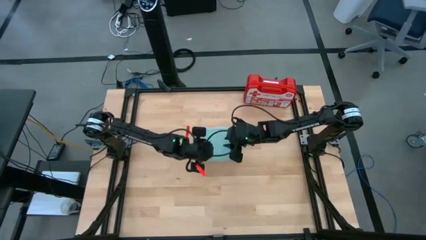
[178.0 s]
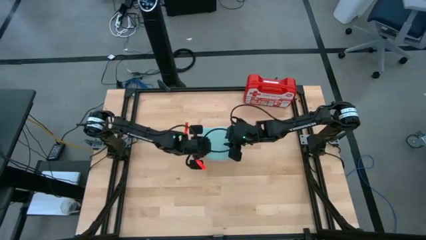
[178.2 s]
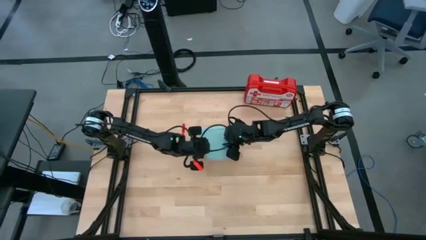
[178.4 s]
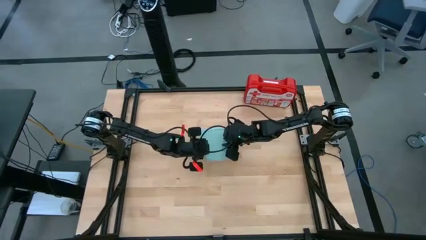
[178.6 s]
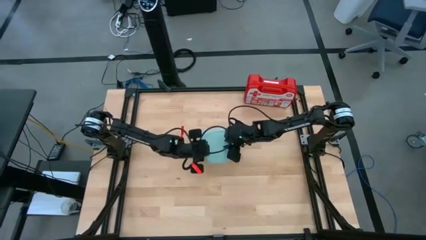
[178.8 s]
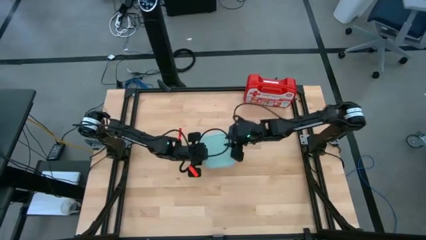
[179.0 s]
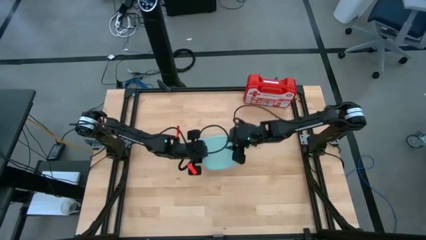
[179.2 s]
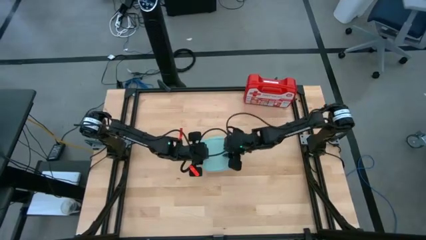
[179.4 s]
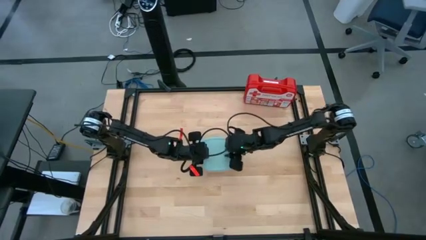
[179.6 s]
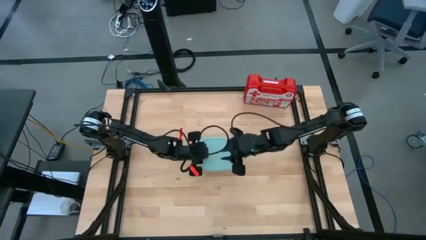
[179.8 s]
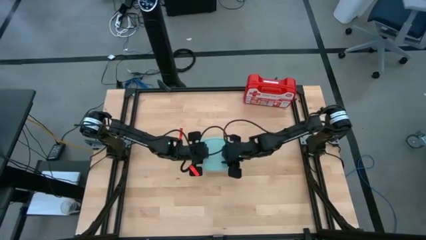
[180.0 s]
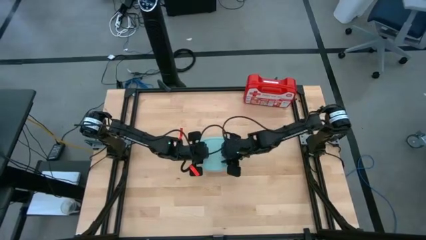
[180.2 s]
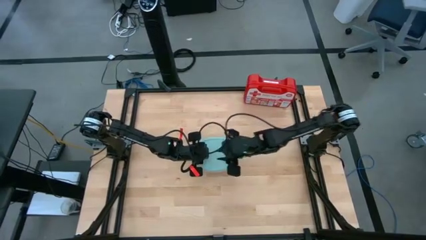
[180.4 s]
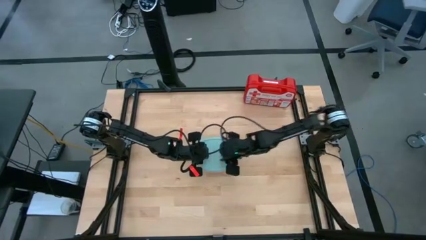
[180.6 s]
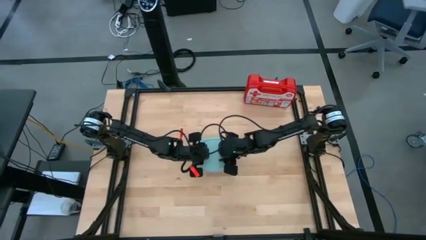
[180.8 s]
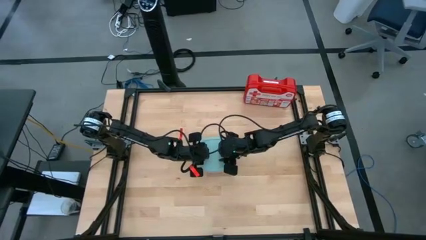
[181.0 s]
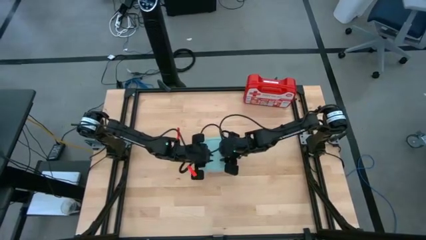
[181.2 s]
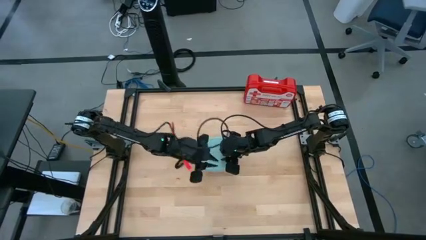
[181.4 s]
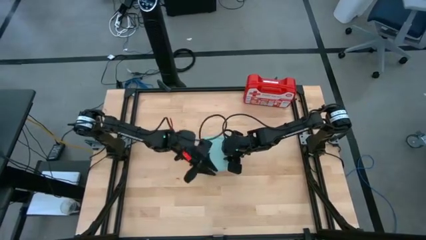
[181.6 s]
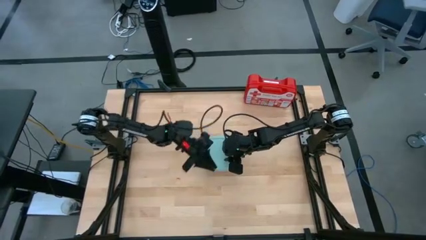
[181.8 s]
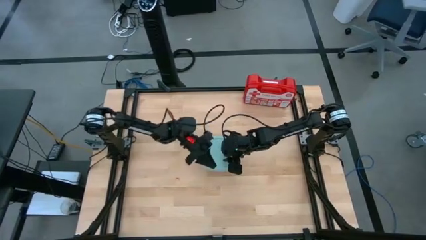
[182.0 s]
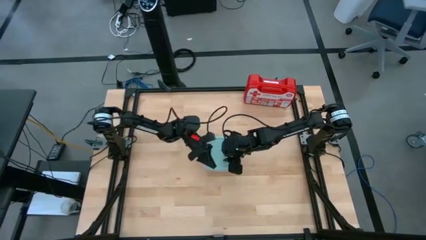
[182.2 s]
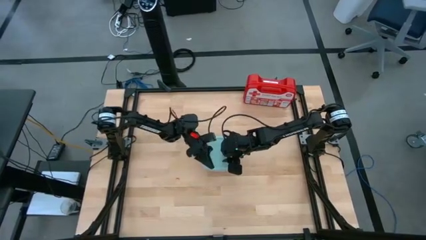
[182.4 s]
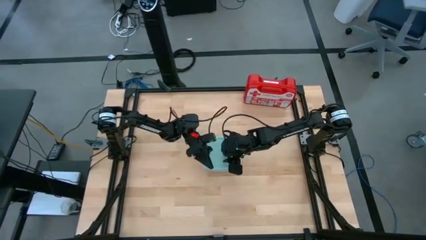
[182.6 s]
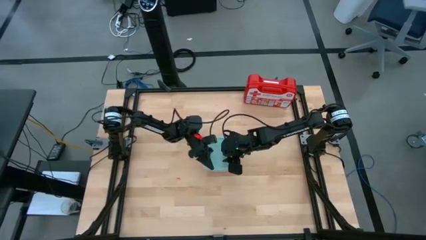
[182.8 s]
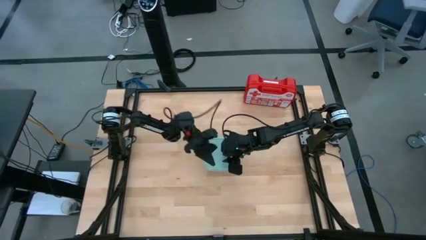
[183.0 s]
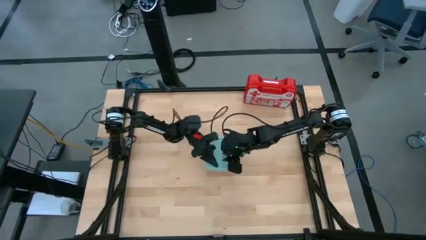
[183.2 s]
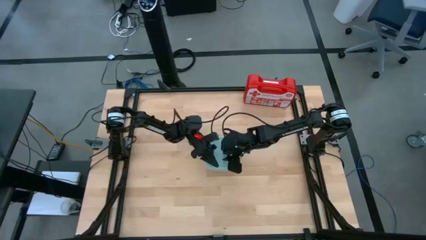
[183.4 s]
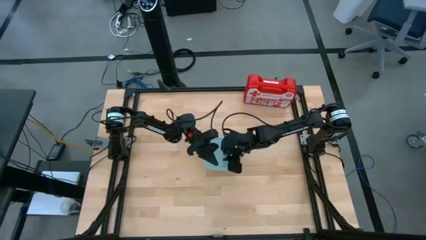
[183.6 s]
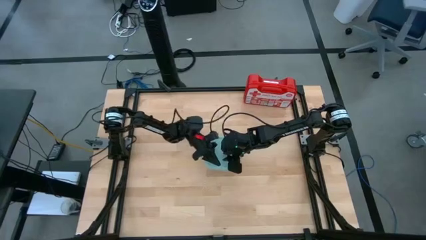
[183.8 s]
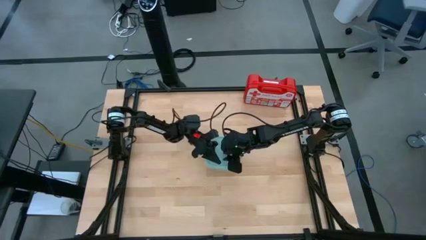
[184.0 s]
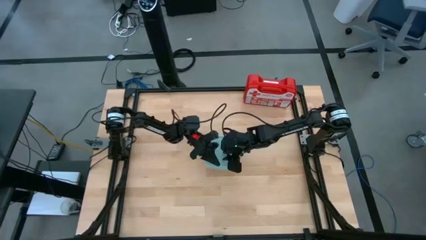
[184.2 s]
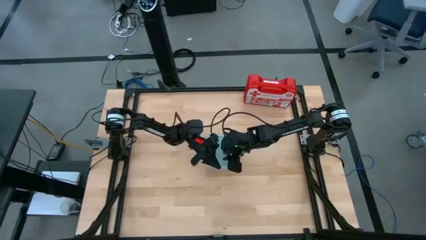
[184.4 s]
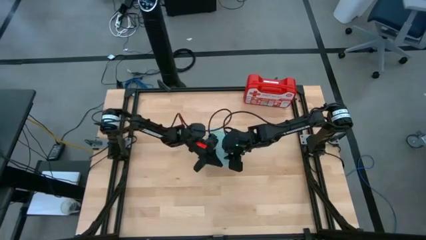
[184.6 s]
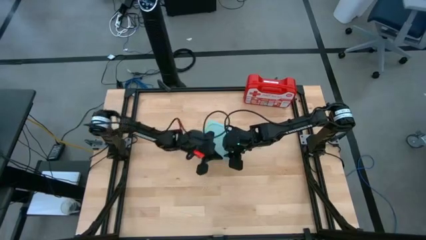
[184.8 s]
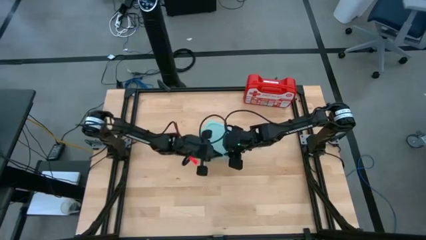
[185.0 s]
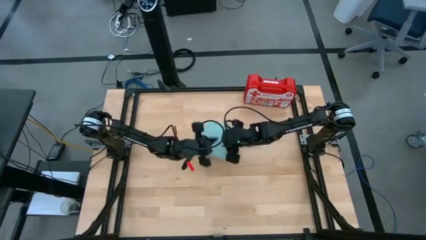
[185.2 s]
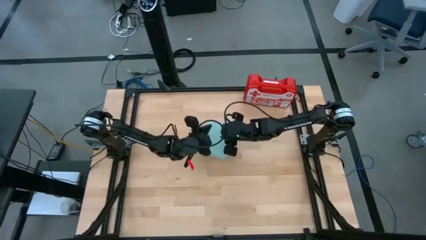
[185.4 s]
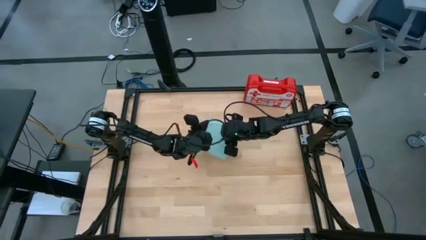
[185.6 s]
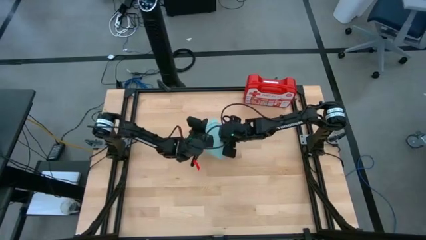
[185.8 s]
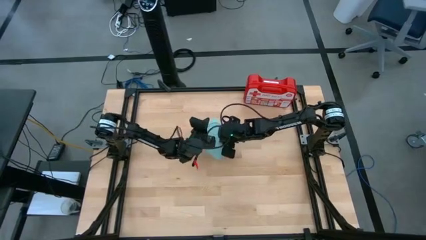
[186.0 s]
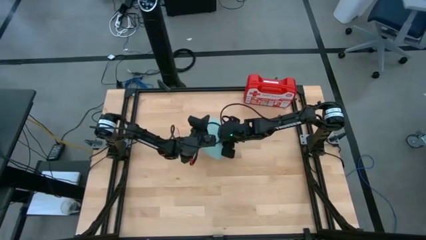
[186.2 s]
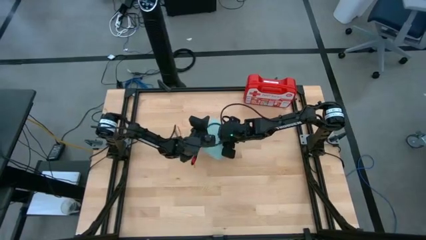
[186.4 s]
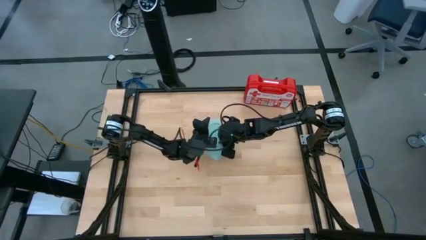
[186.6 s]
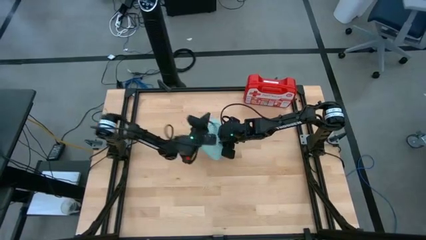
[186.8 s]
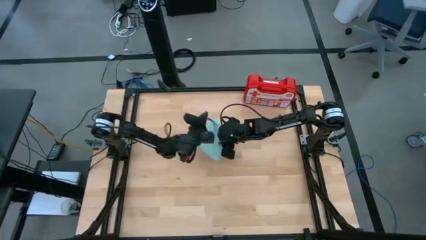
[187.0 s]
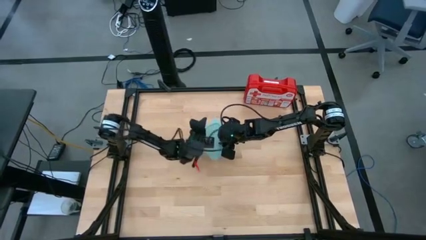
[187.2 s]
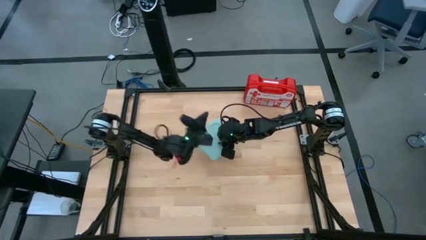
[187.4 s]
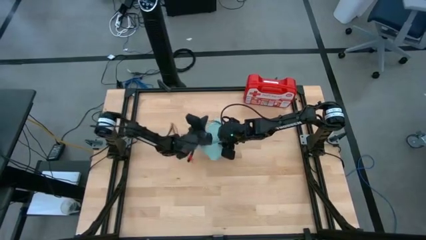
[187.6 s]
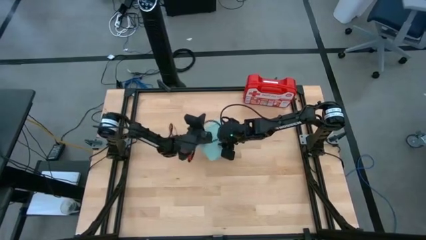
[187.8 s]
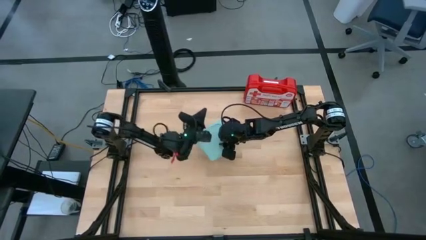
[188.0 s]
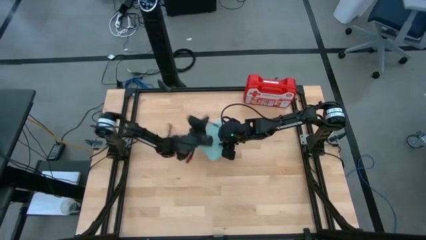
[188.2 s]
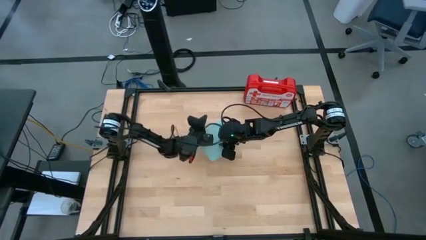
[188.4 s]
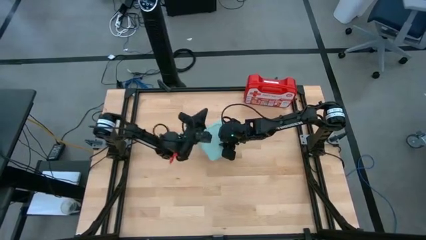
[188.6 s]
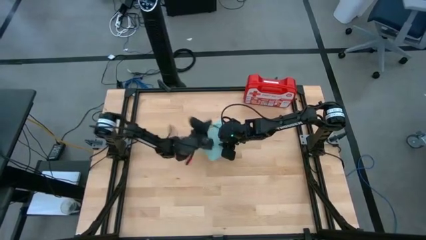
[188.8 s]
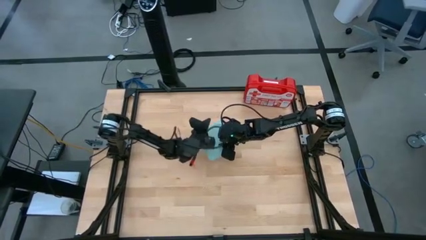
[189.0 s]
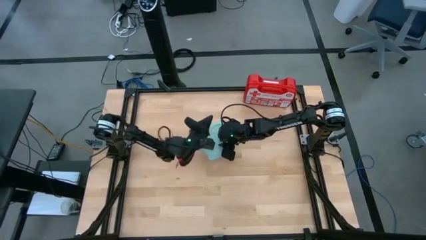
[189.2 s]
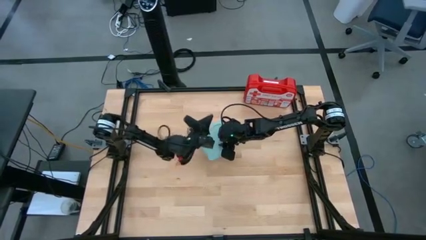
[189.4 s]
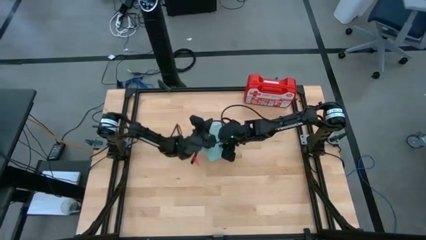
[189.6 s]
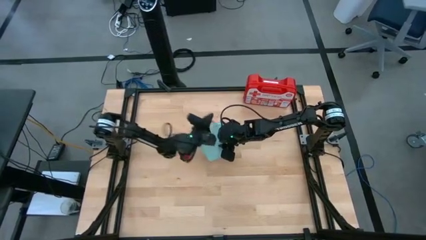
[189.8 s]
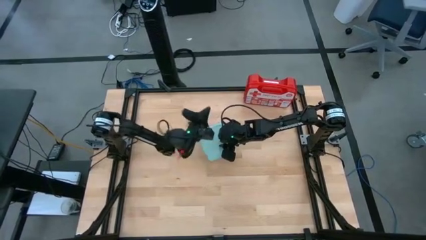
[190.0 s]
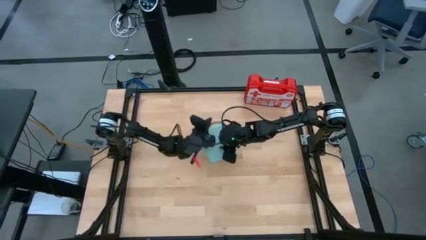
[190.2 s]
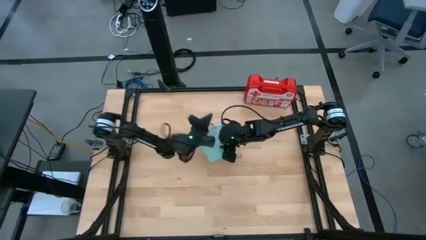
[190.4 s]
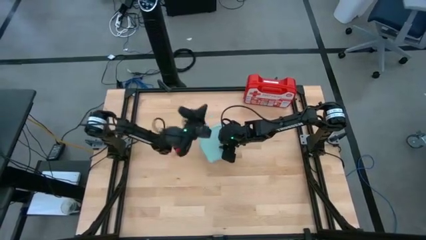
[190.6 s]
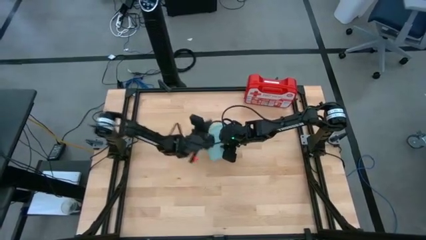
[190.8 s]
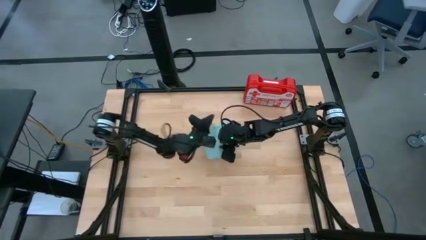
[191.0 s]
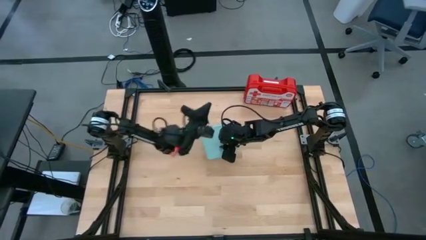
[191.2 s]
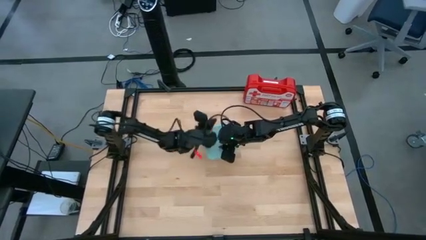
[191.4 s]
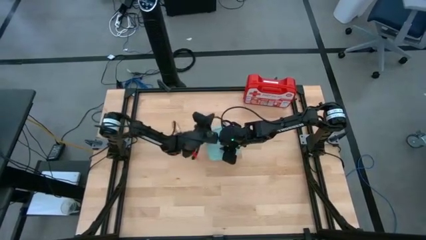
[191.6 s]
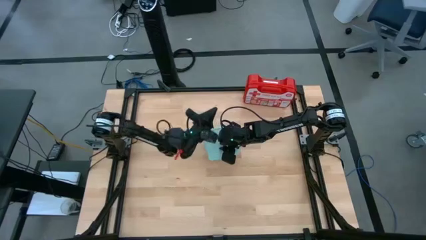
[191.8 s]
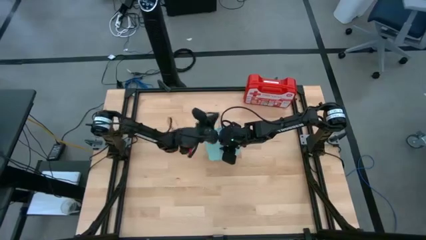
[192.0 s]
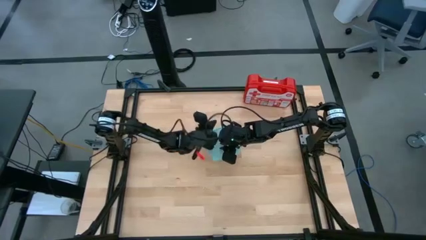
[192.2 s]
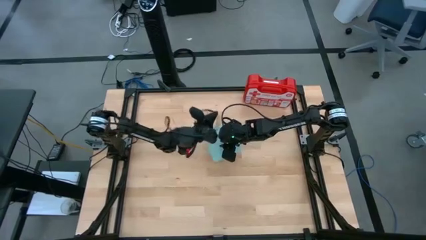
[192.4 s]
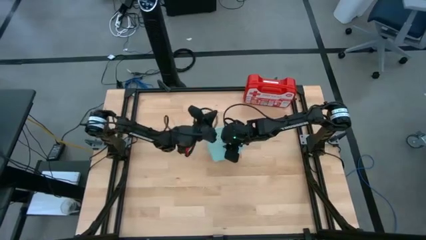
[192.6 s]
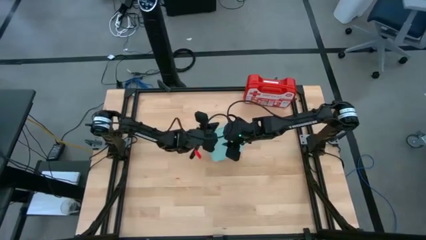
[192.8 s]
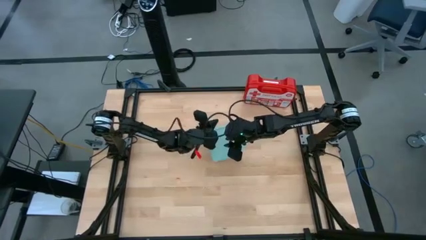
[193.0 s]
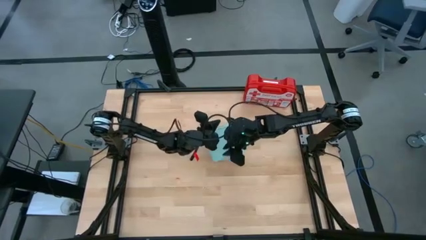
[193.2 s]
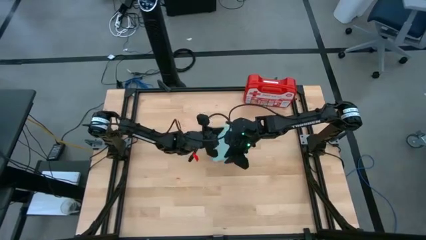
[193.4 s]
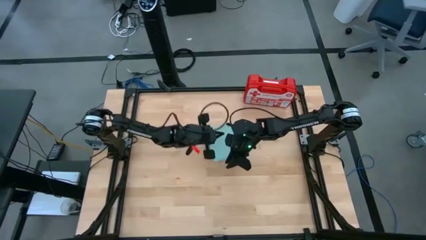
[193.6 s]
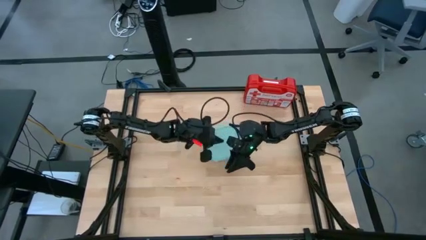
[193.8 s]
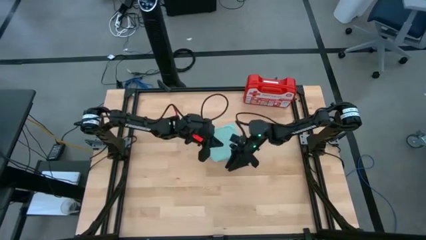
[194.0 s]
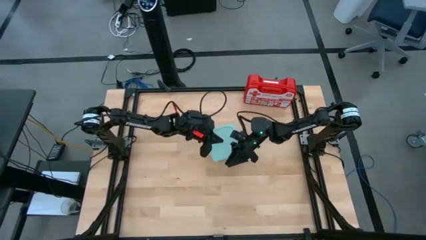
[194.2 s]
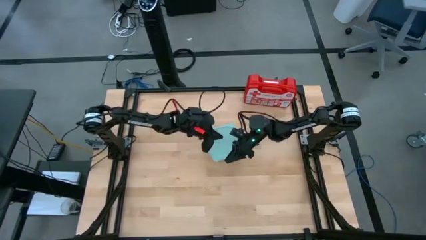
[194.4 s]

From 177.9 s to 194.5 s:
Task: Roll bandage
Close the transparent food container lid
